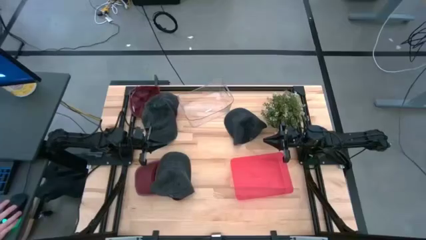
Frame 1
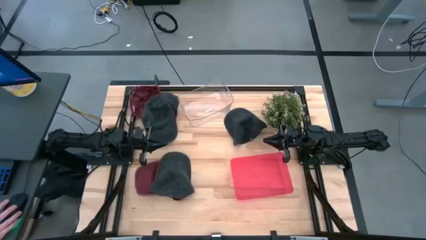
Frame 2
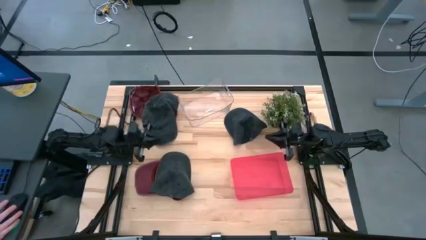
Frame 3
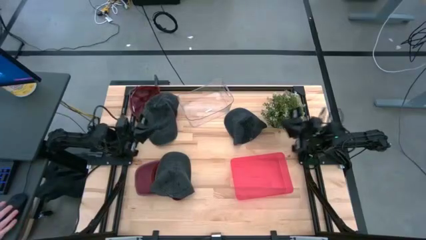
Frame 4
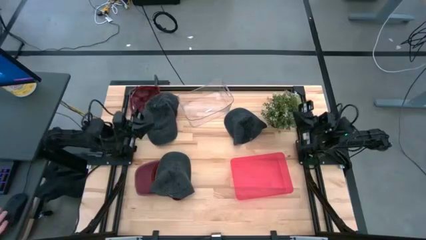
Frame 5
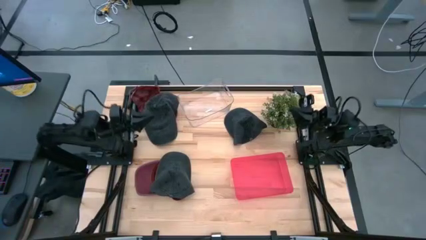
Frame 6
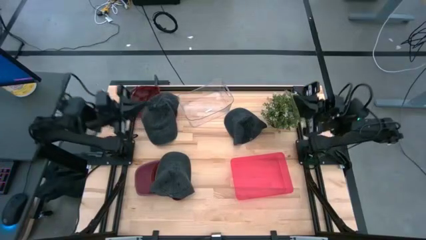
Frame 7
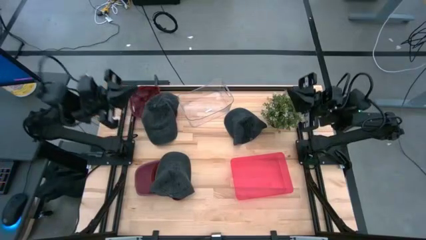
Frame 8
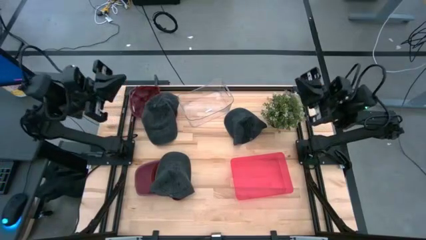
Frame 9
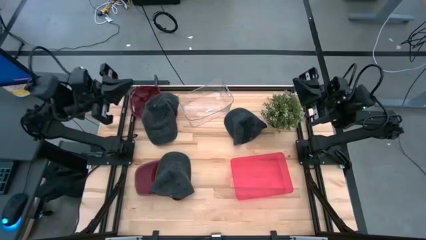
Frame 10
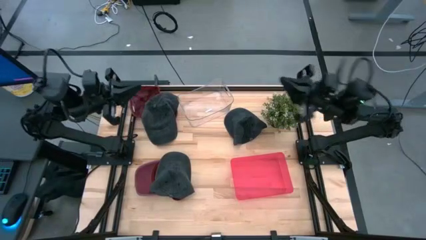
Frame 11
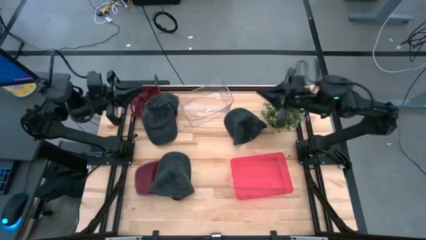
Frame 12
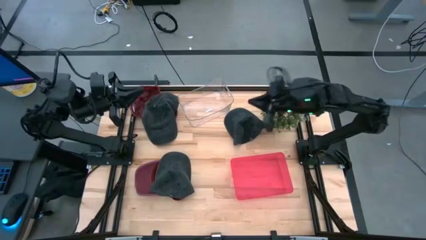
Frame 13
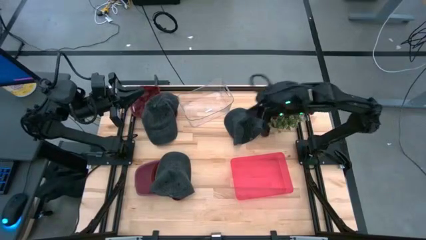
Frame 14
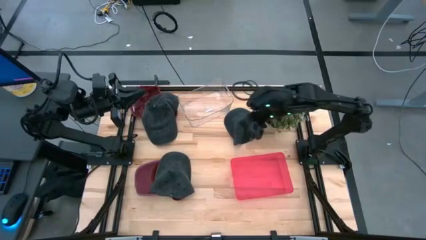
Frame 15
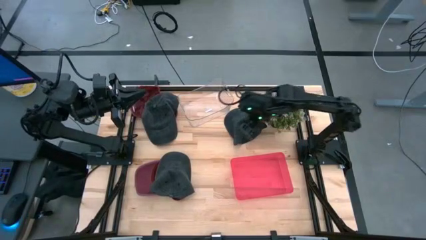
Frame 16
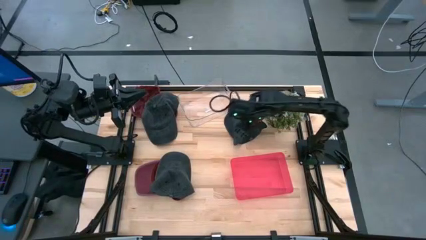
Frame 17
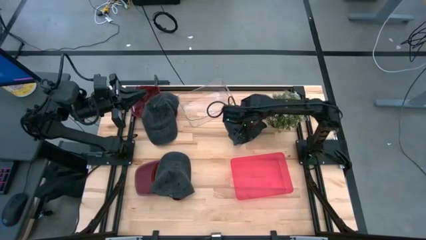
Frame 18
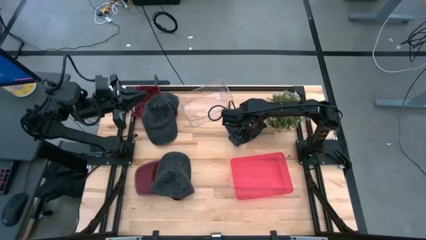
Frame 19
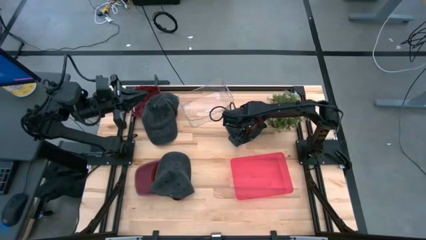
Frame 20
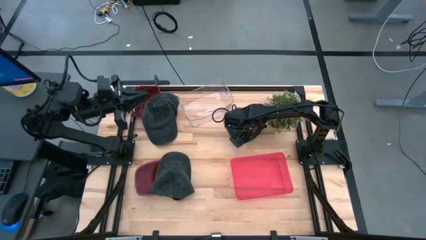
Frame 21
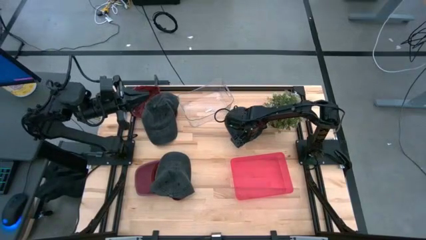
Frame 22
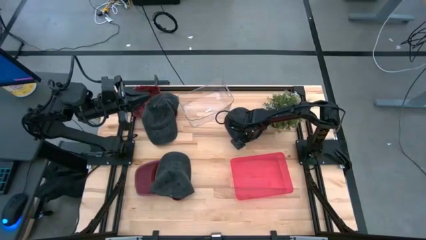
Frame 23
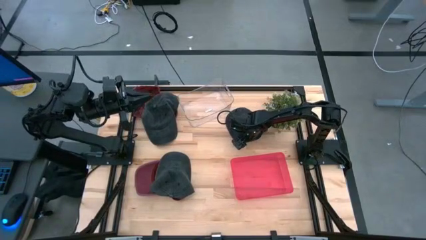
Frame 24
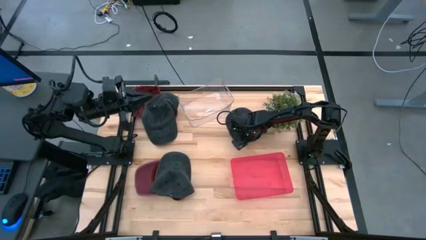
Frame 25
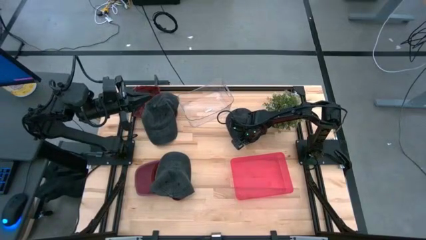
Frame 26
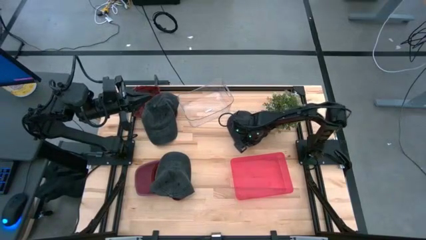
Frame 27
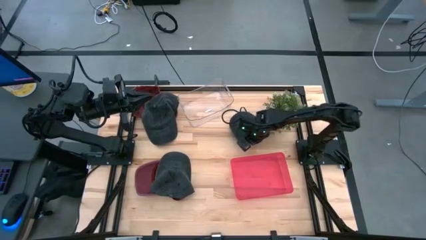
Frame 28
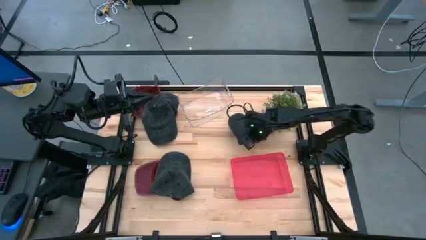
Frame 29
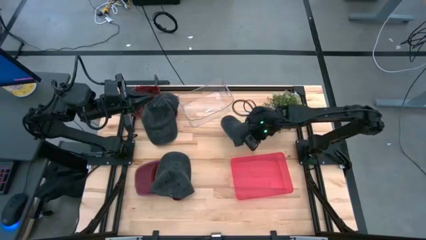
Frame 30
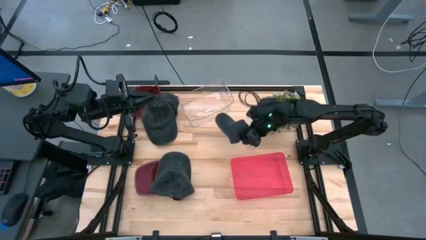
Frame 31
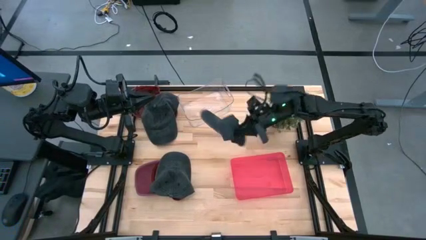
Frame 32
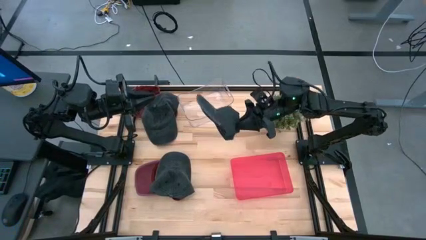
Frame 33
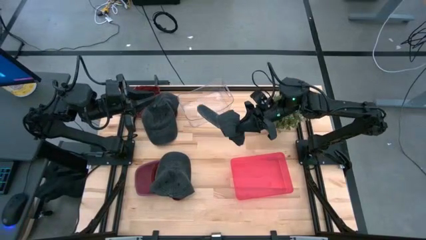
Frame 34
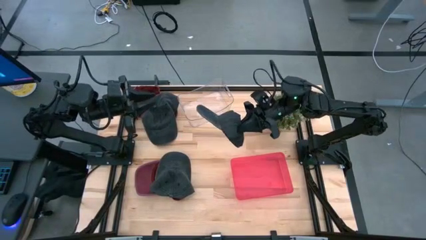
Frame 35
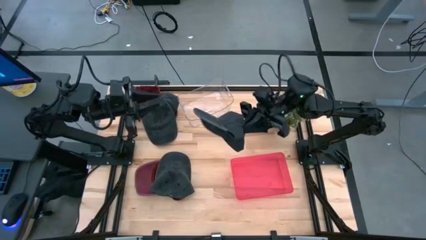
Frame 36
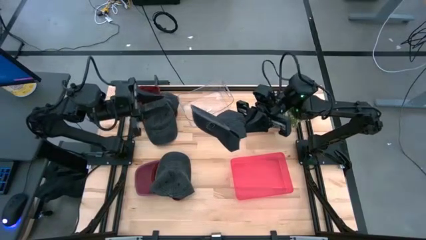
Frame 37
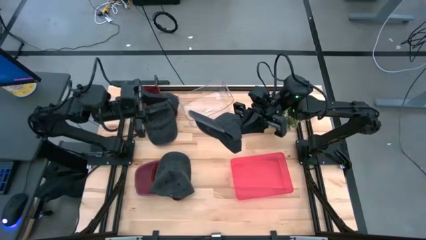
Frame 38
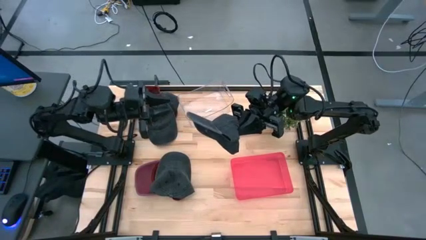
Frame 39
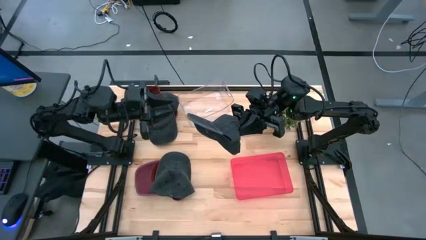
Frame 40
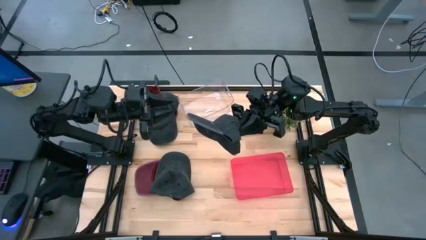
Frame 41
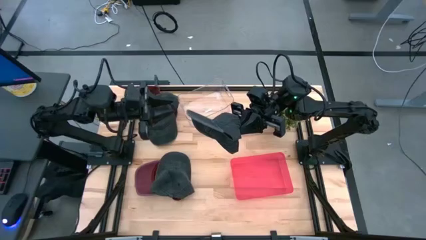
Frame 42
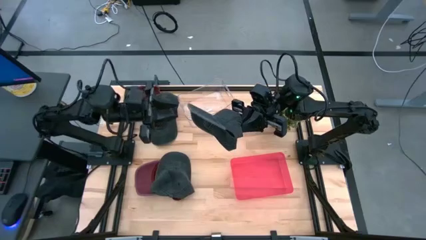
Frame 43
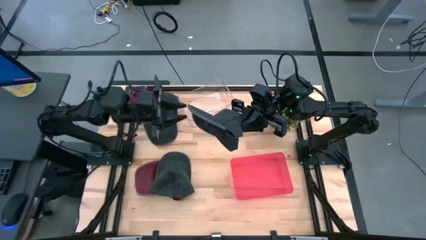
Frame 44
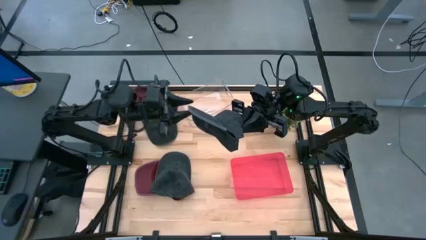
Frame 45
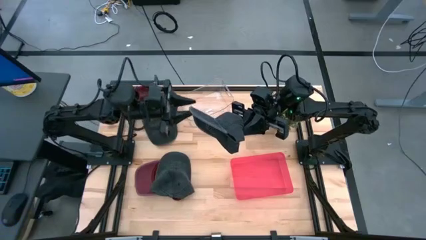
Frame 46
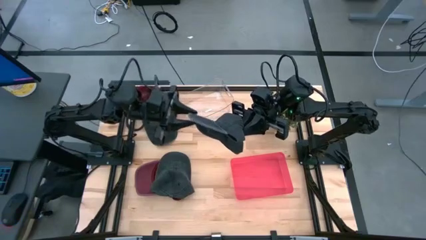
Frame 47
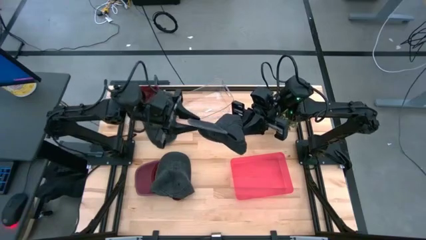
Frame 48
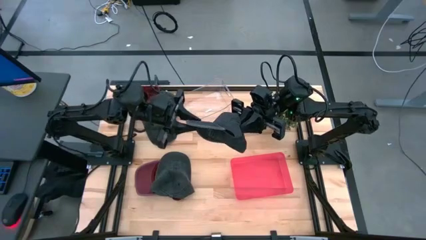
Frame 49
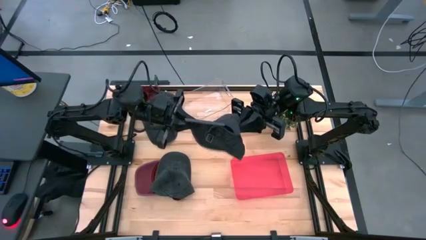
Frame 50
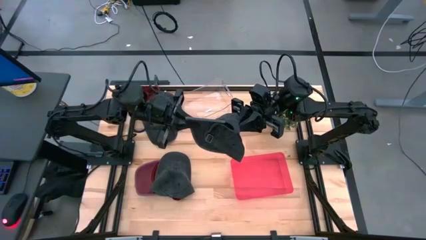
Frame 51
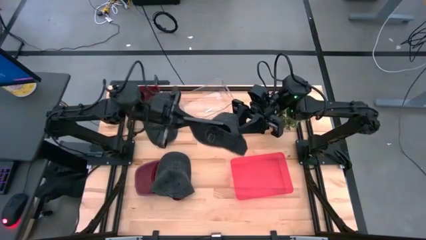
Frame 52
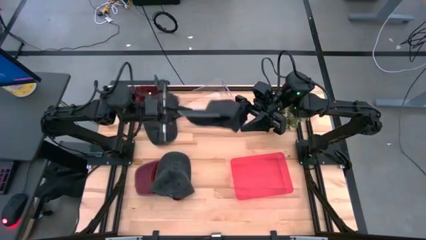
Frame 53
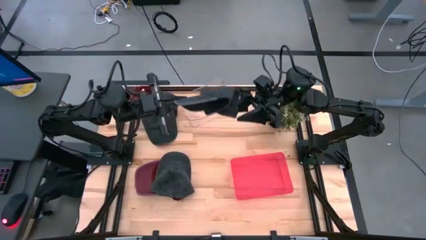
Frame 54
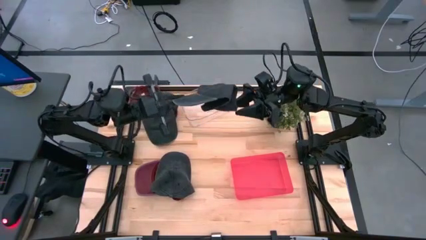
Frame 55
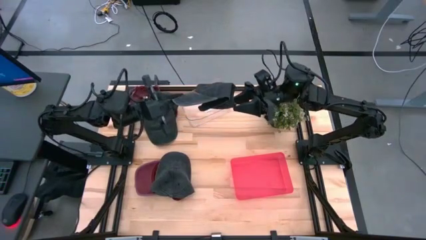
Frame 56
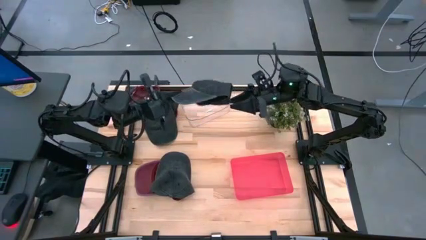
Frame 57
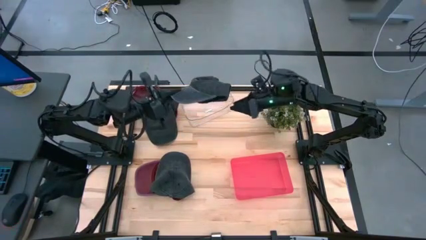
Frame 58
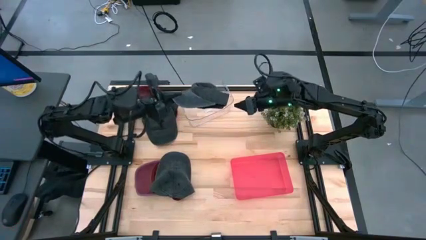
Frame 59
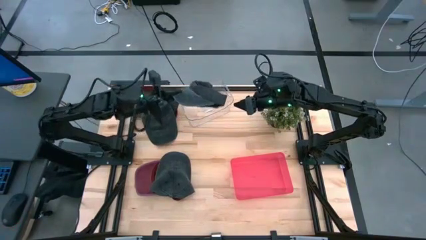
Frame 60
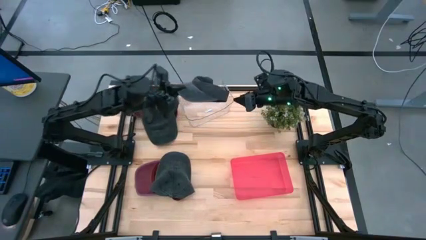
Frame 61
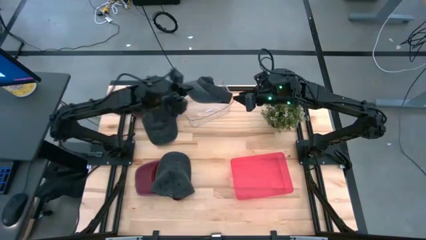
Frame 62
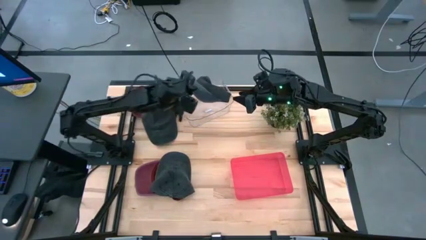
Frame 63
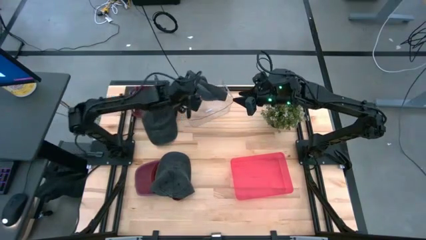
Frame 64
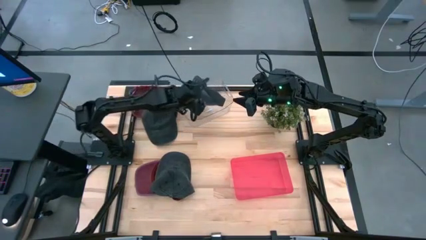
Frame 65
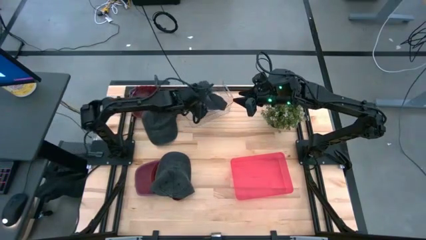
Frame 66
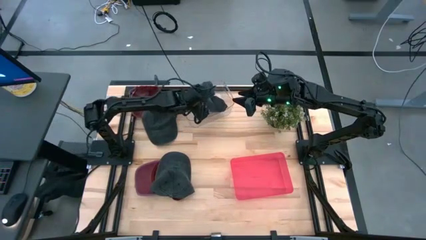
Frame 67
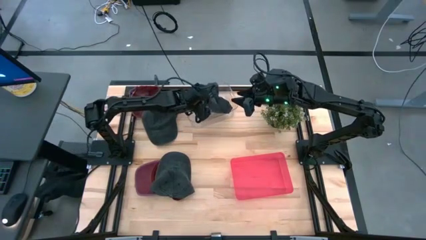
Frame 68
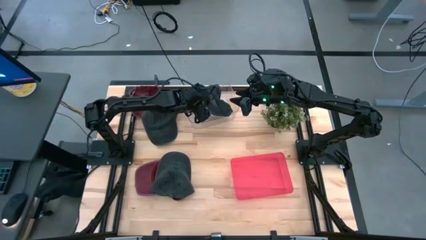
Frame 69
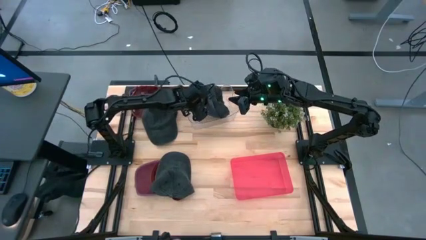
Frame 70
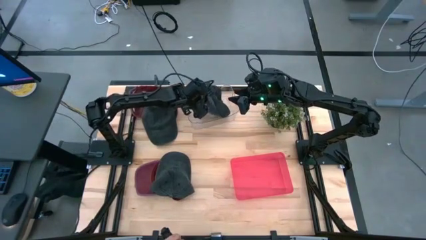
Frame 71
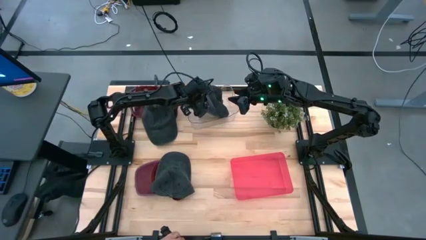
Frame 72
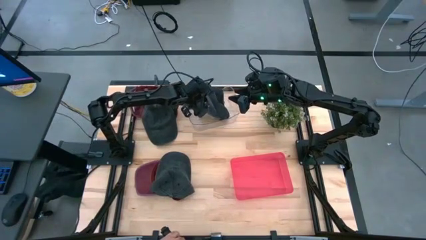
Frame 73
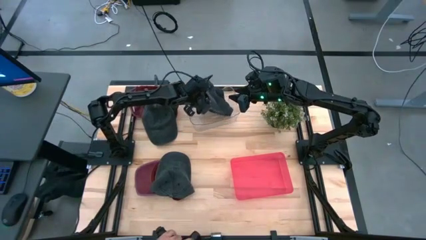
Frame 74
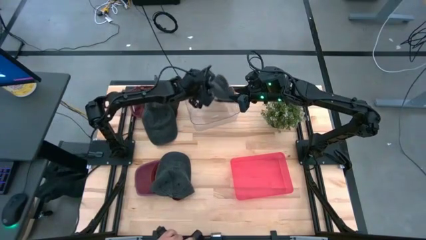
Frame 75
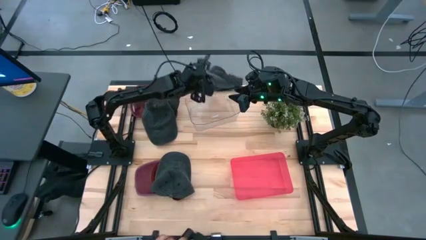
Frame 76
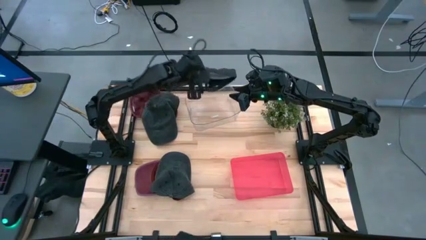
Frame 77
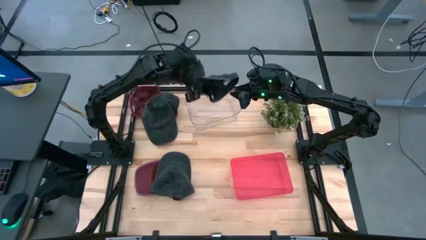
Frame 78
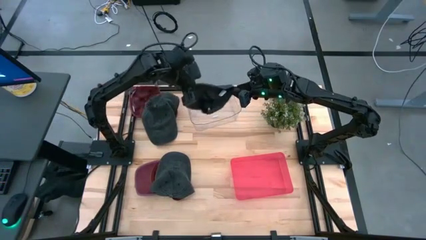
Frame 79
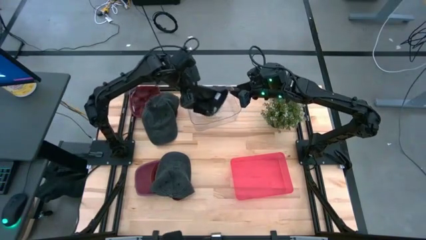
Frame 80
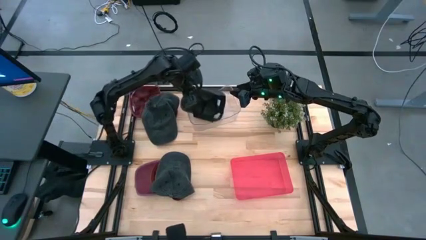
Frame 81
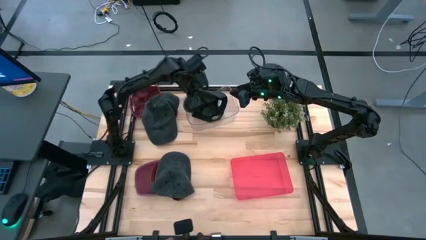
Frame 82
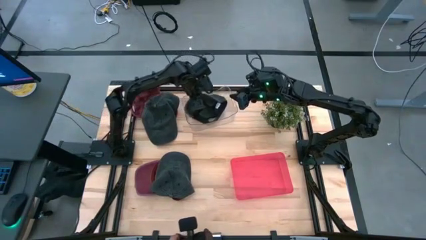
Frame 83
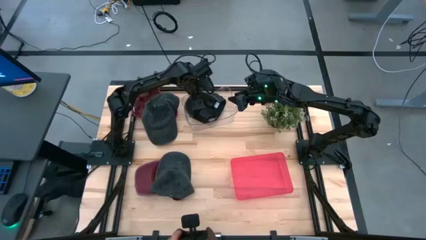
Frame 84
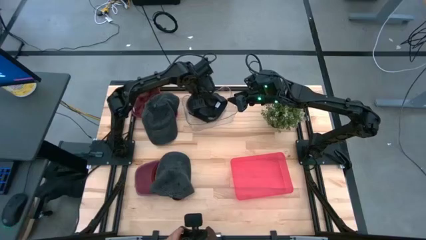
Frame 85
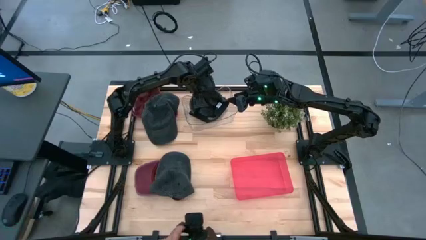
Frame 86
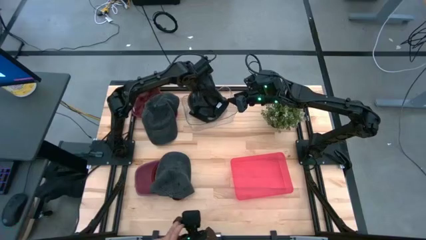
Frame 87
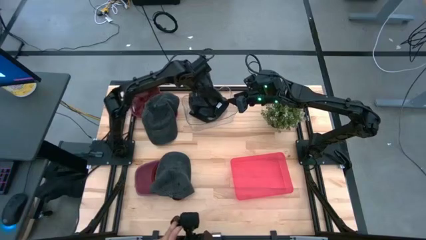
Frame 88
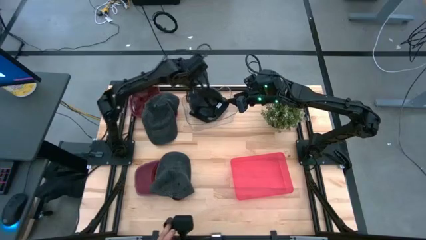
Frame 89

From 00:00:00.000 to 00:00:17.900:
Task: Pick & Place hat
Put the right black cap into the transparent bin
